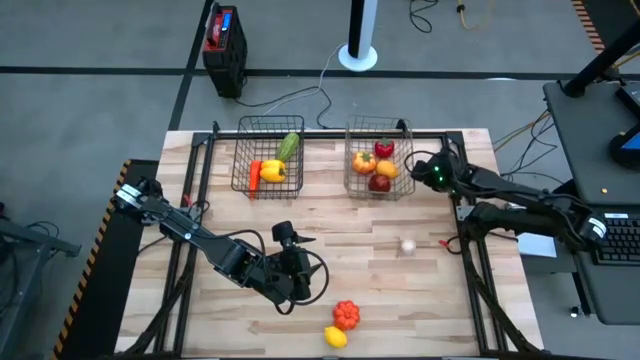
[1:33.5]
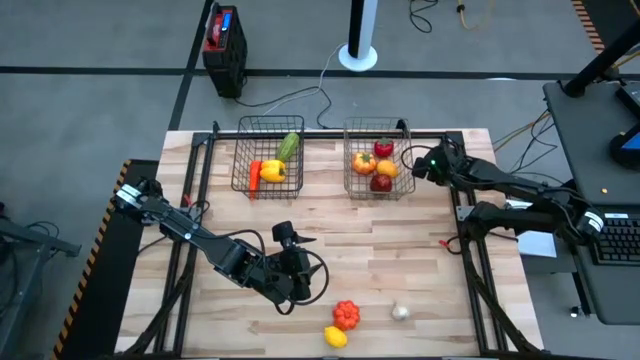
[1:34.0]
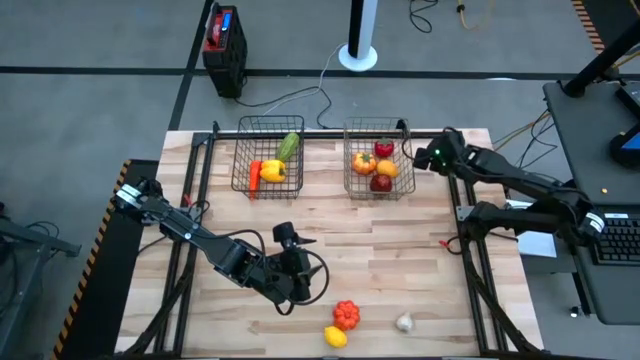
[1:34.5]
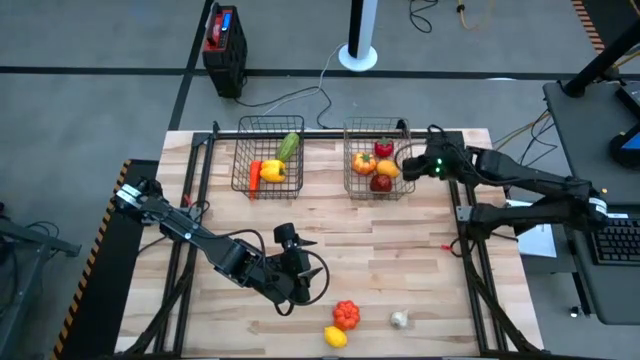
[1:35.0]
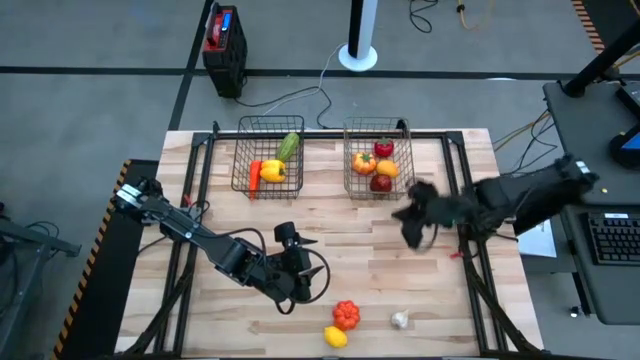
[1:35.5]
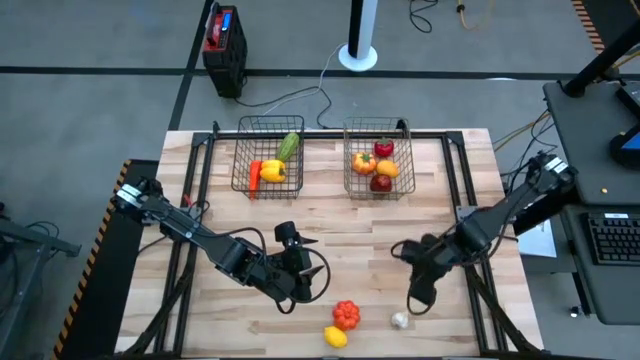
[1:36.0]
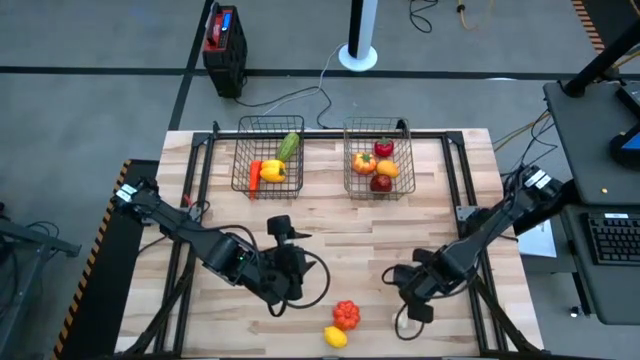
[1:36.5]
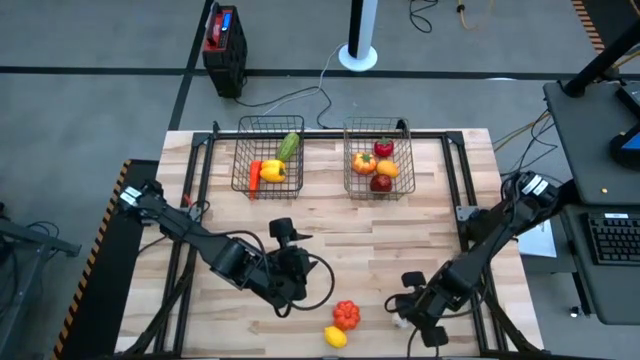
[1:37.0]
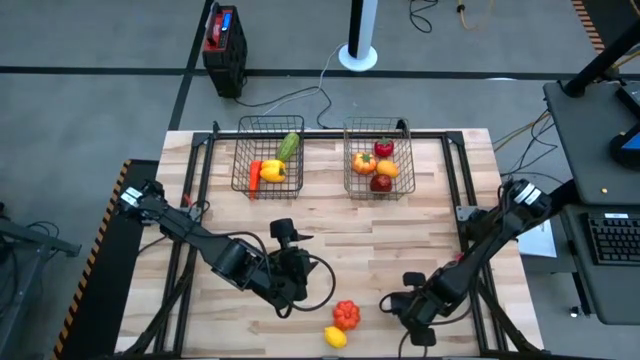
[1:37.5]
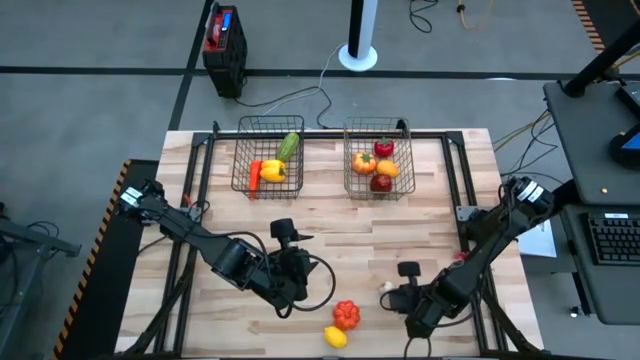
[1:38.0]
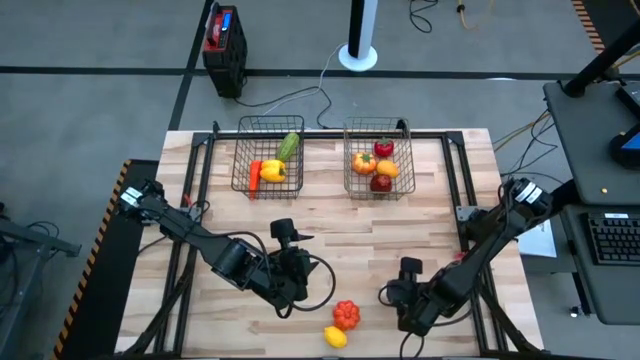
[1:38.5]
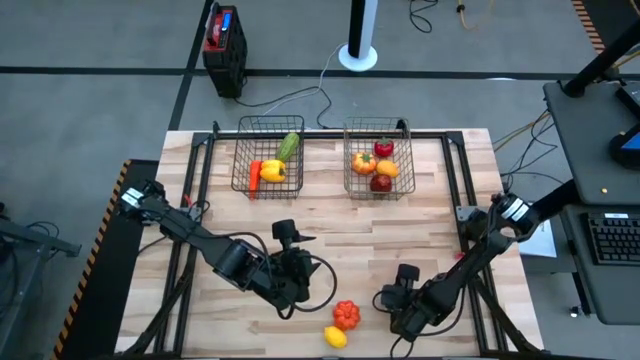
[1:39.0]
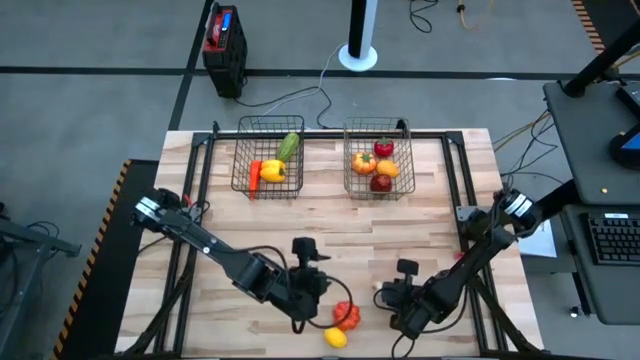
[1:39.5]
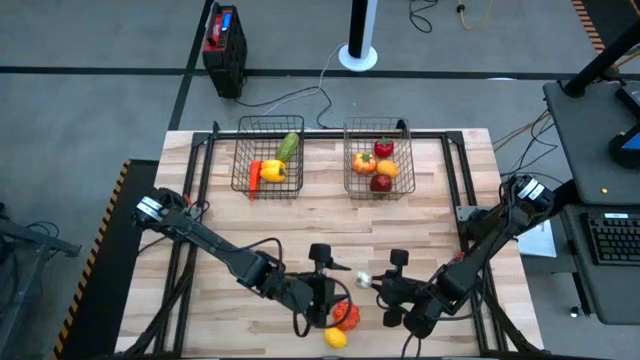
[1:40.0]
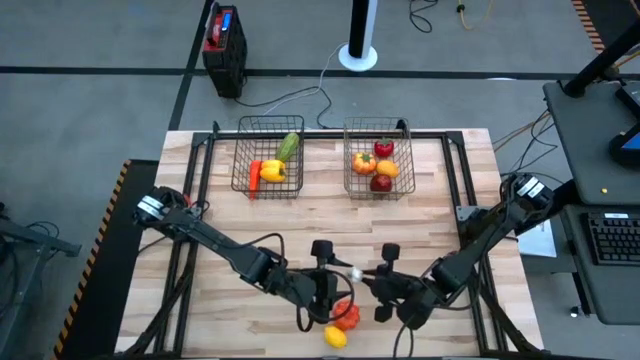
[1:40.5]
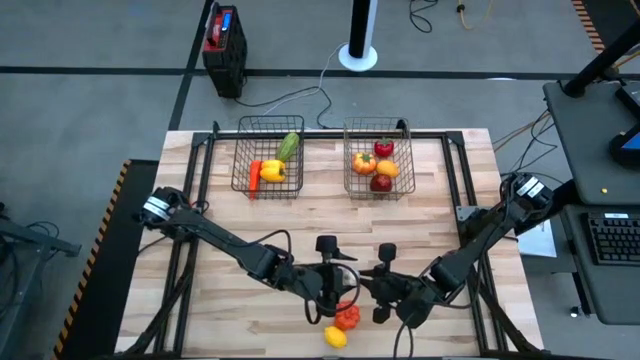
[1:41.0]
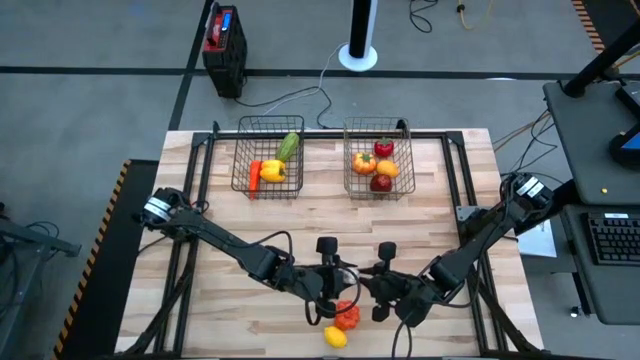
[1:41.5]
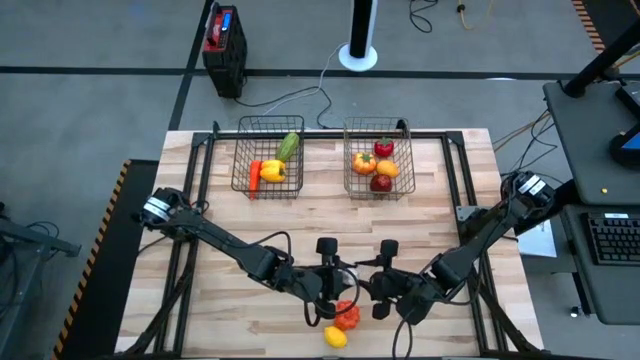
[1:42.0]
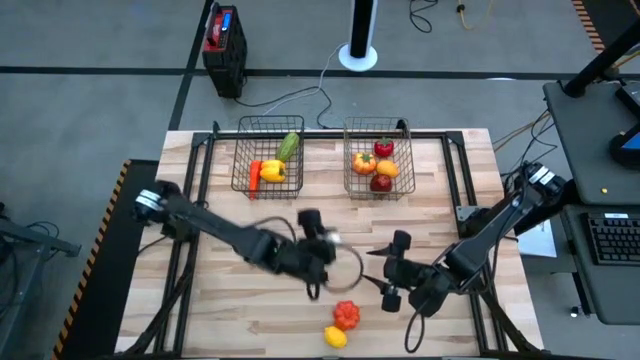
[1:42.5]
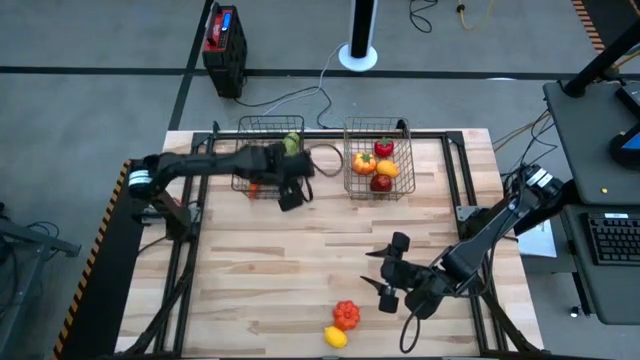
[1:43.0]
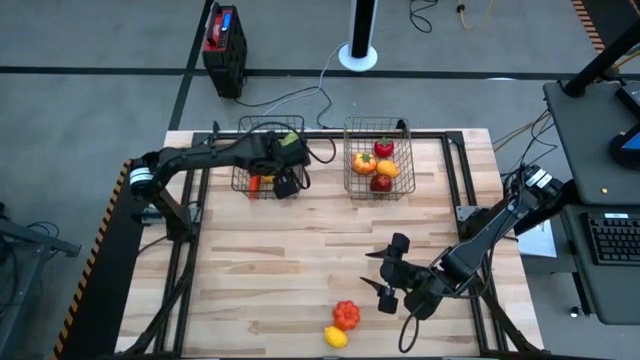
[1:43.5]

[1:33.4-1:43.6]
Task: Sort produce into baskets
Put the white garlic into the black of the wire basket

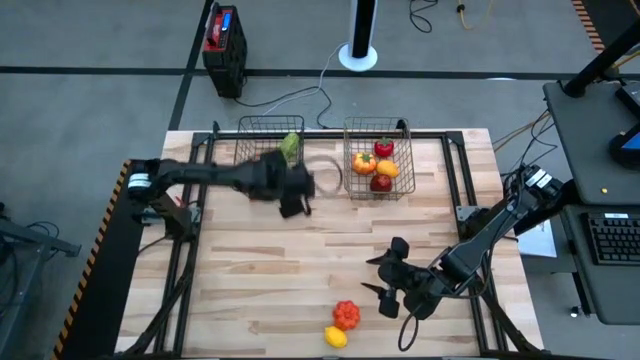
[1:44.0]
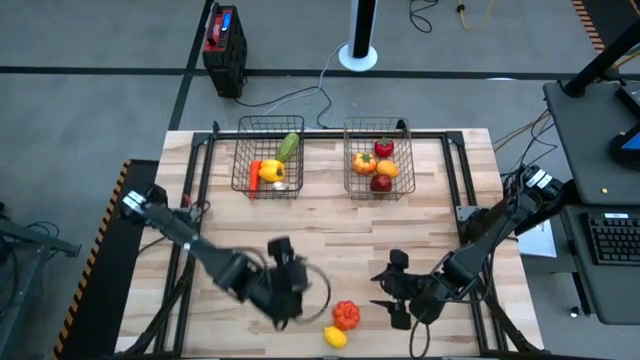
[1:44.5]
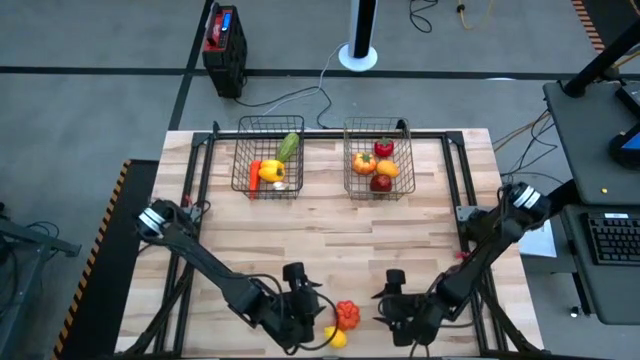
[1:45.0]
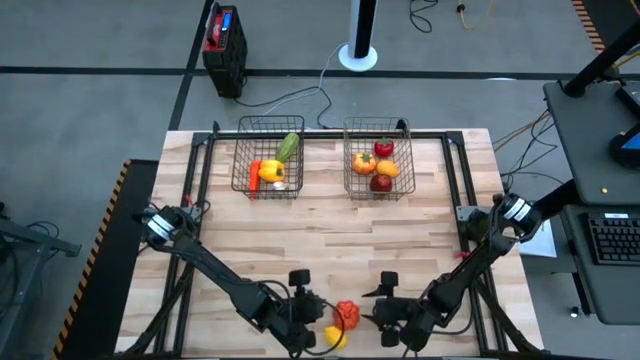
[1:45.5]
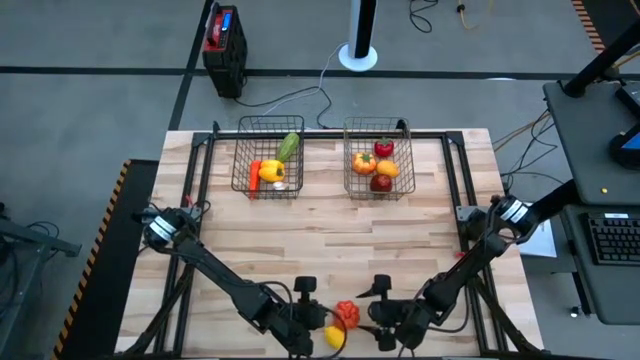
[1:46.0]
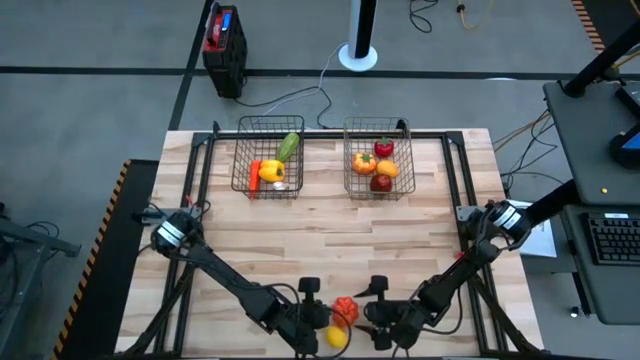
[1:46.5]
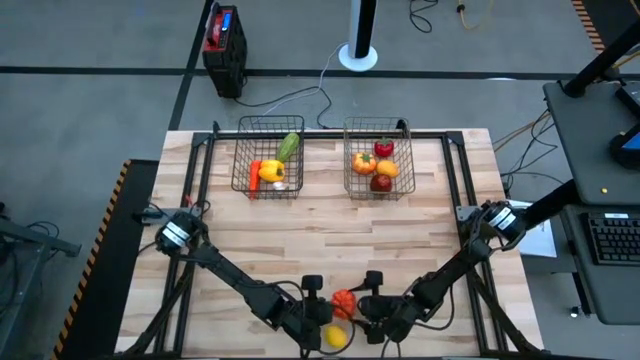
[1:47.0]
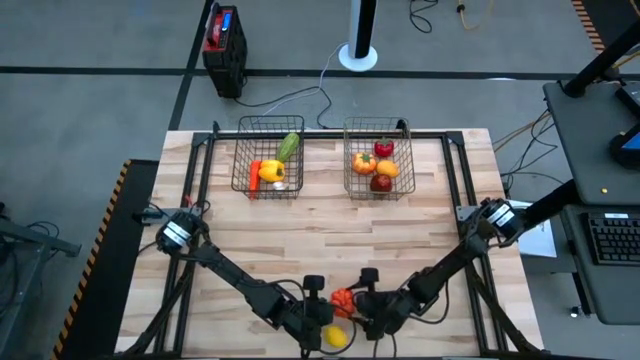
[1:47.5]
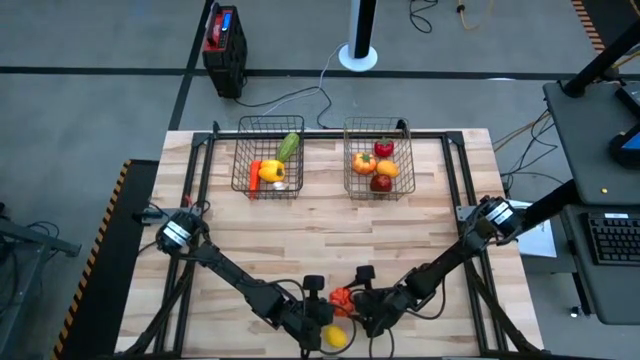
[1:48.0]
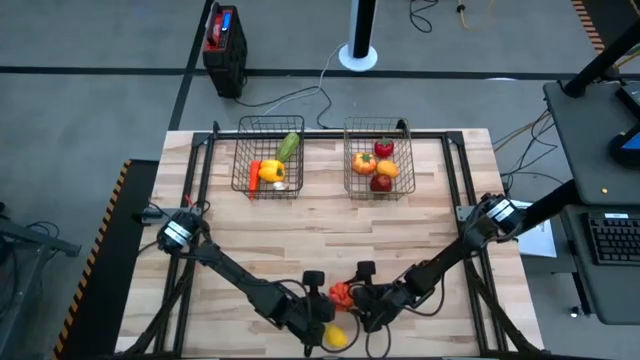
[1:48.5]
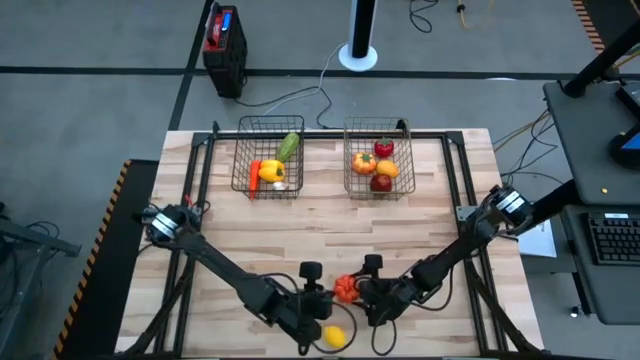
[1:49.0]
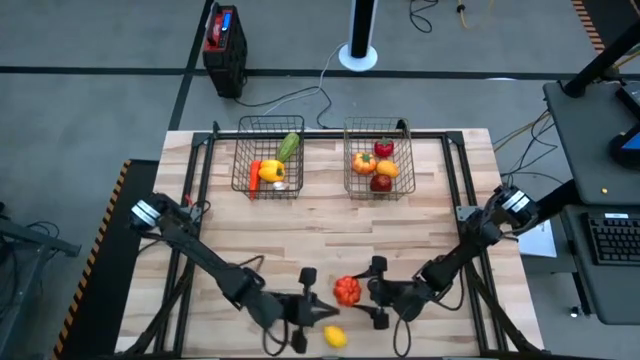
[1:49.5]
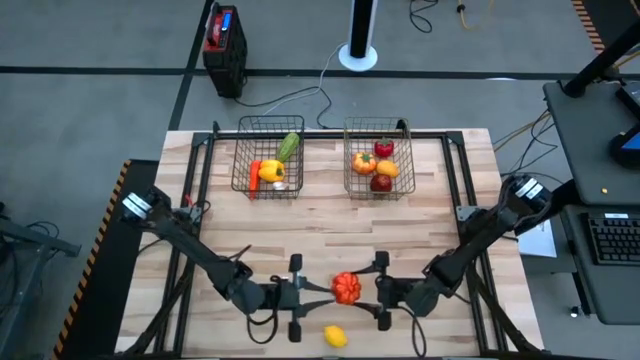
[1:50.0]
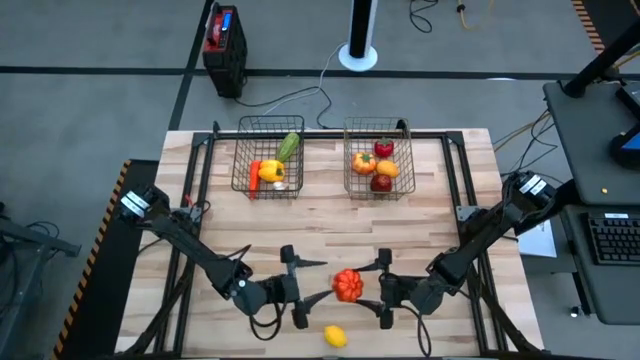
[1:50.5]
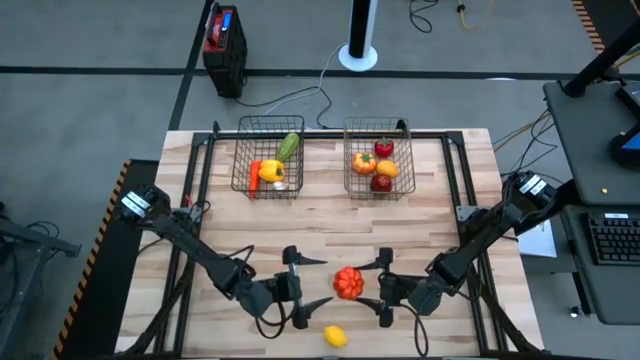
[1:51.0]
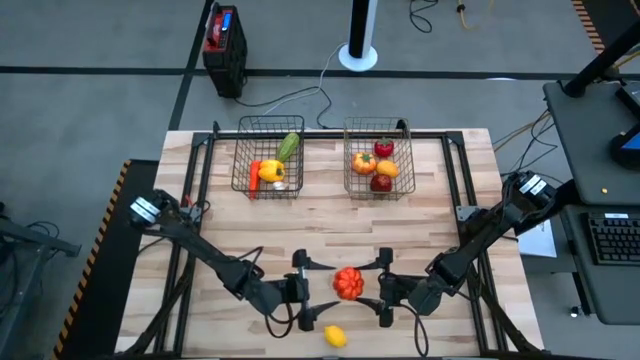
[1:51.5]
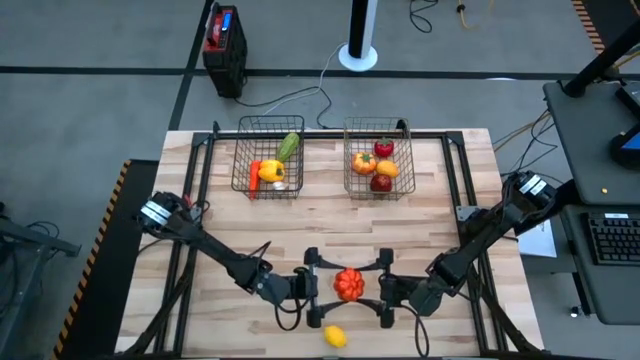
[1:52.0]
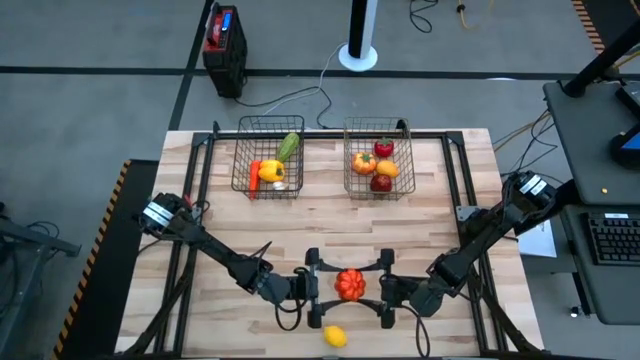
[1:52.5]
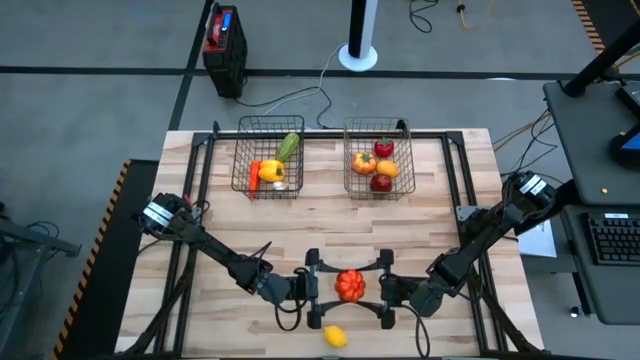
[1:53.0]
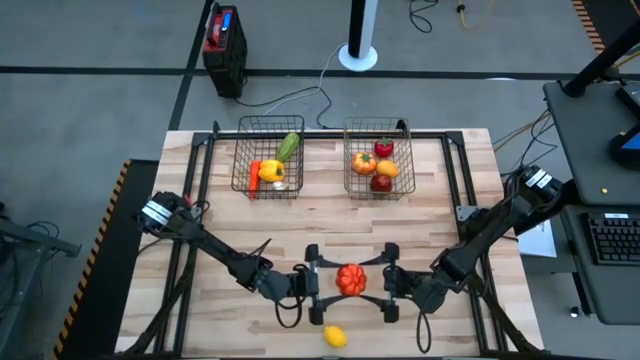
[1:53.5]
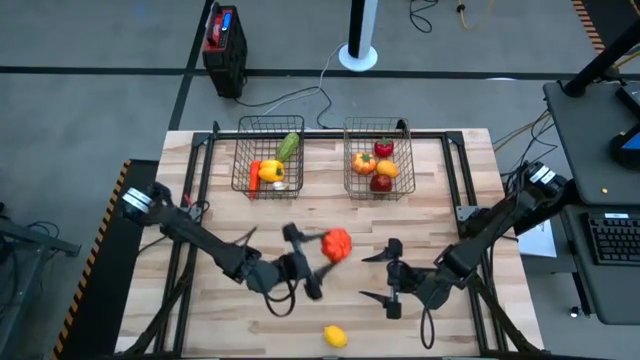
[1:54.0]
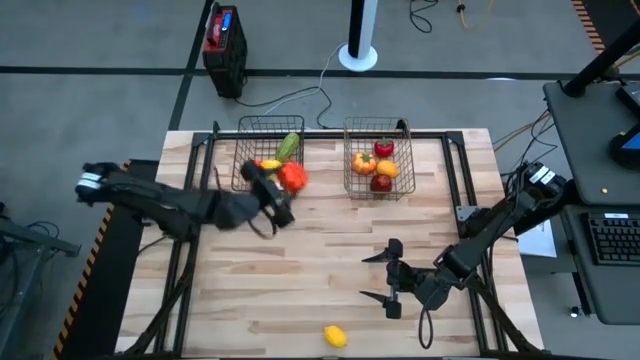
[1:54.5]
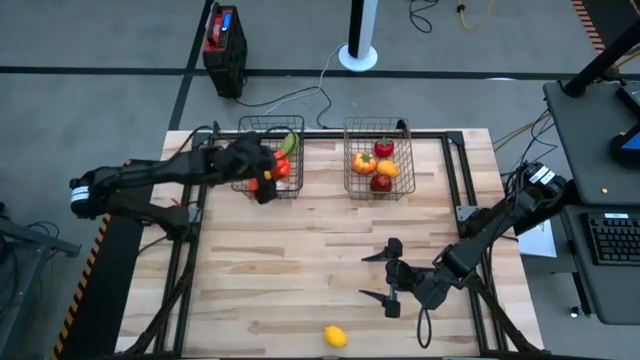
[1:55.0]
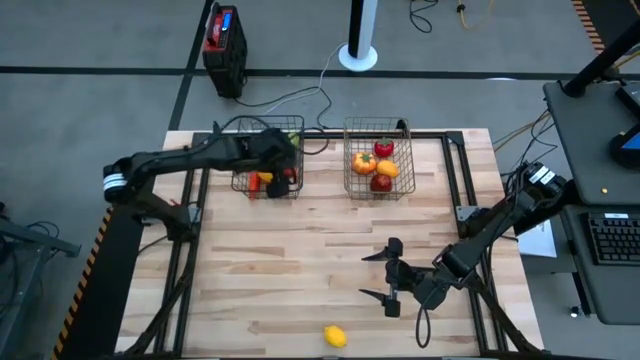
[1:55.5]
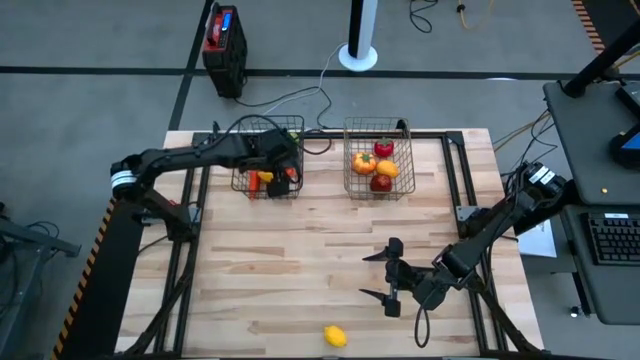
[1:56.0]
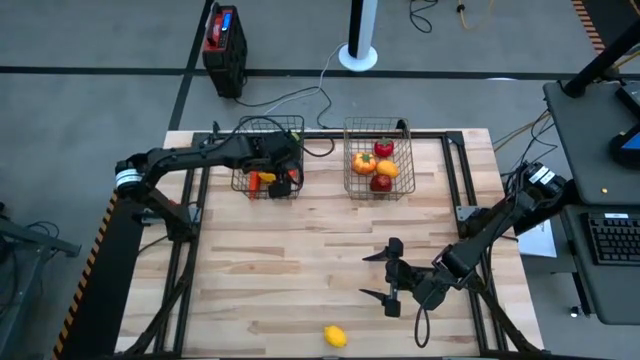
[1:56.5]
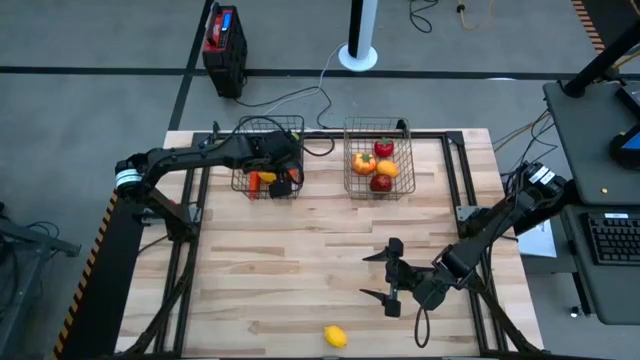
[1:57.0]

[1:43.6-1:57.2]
Put the orange pumpkin into the black wire basket
